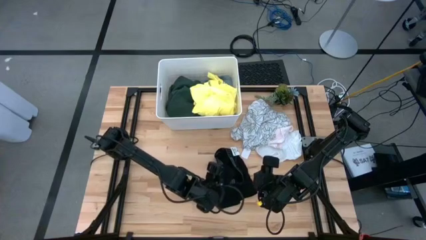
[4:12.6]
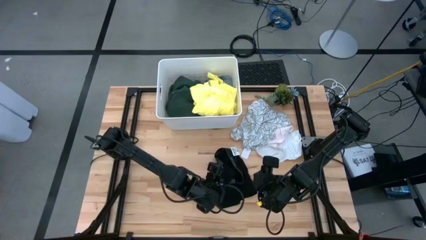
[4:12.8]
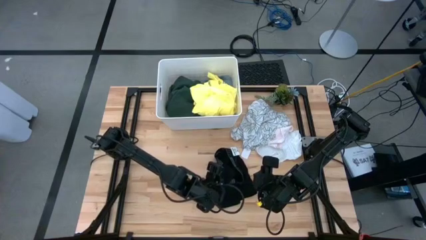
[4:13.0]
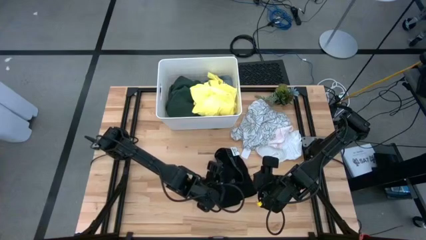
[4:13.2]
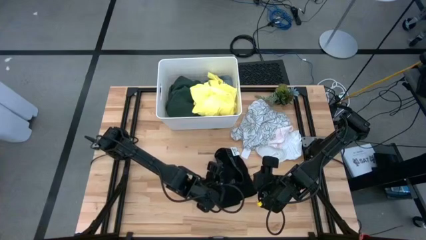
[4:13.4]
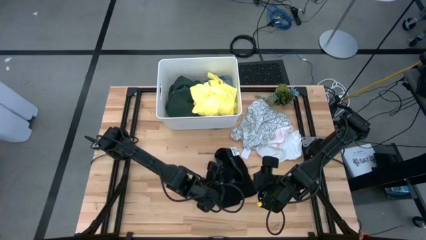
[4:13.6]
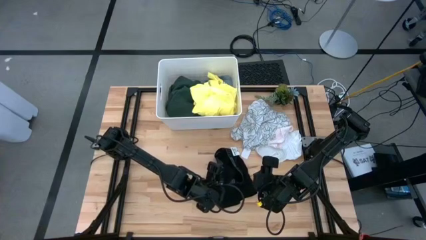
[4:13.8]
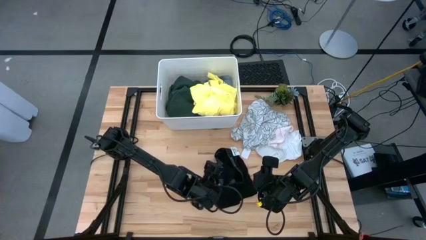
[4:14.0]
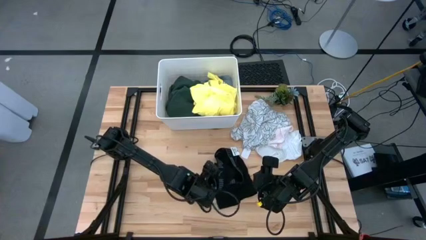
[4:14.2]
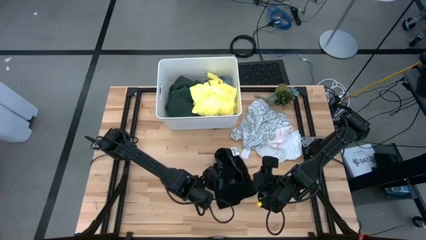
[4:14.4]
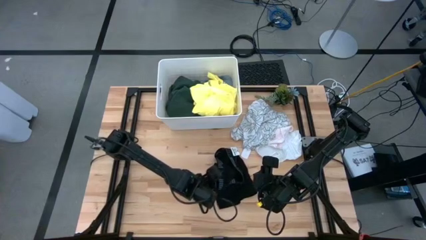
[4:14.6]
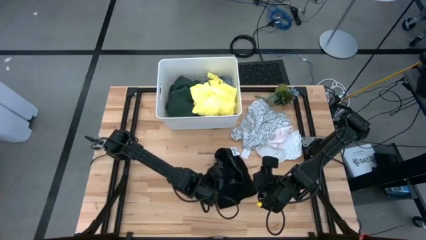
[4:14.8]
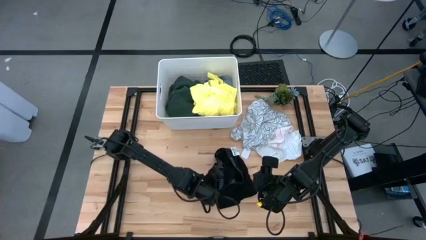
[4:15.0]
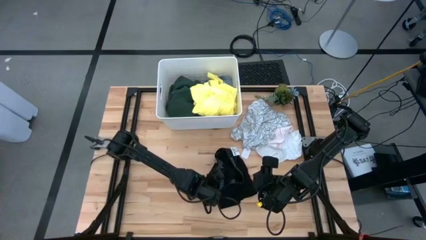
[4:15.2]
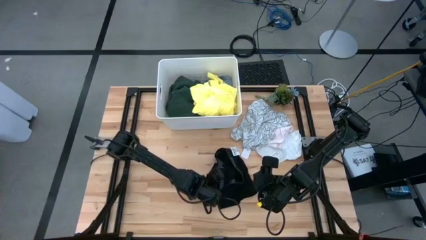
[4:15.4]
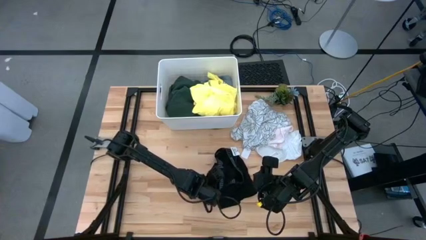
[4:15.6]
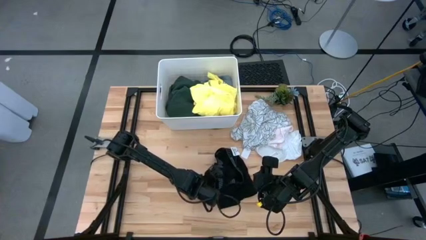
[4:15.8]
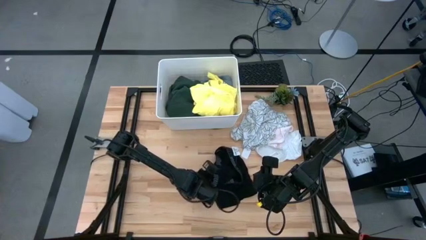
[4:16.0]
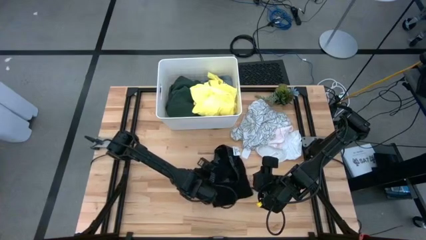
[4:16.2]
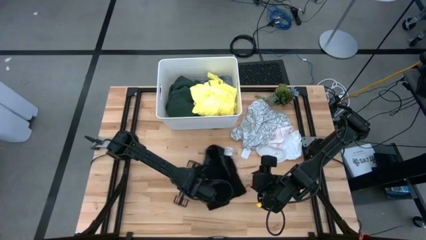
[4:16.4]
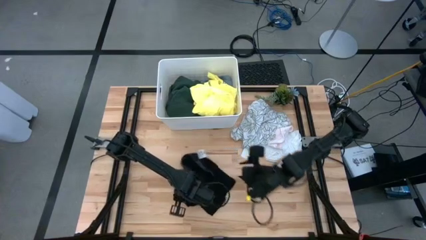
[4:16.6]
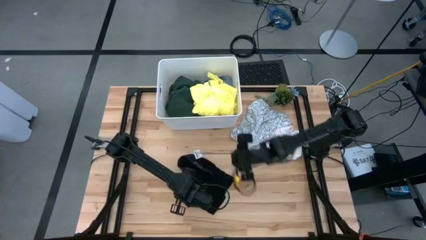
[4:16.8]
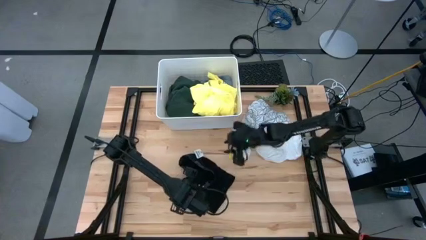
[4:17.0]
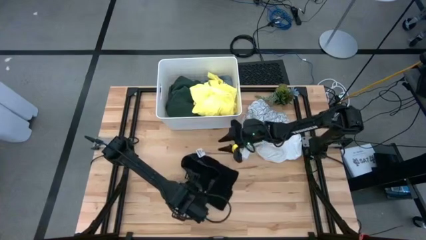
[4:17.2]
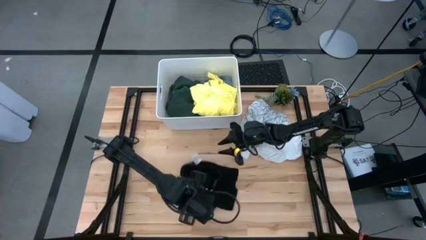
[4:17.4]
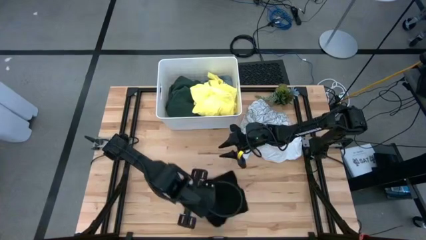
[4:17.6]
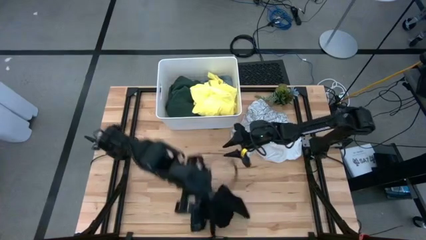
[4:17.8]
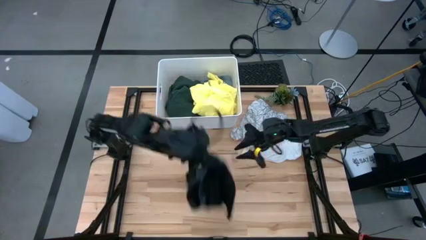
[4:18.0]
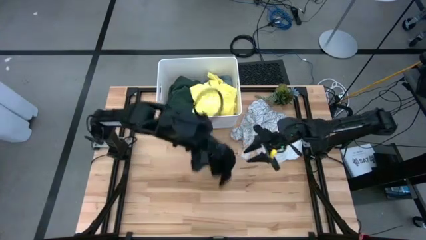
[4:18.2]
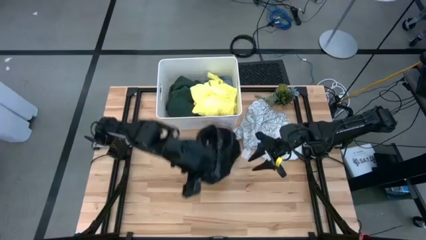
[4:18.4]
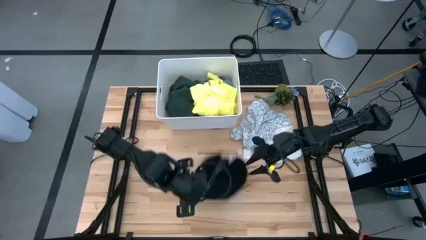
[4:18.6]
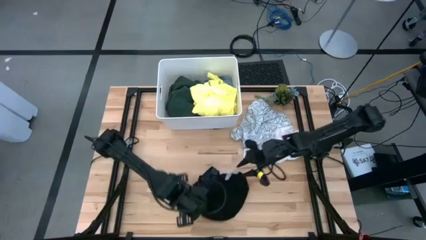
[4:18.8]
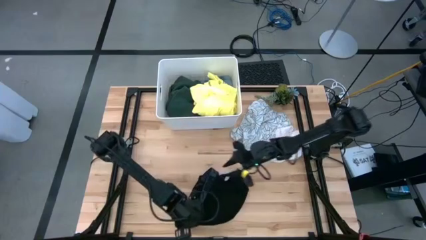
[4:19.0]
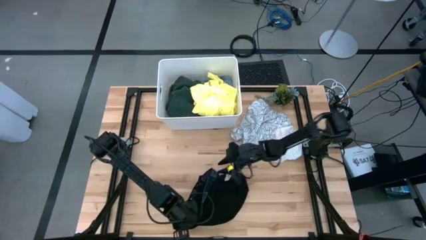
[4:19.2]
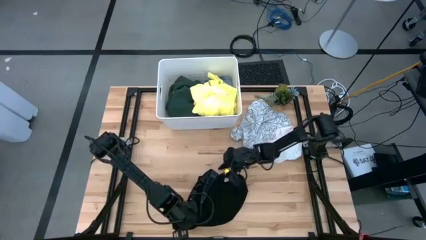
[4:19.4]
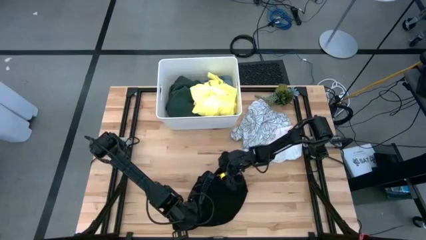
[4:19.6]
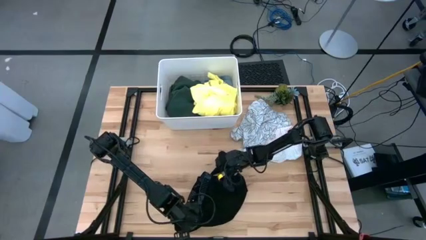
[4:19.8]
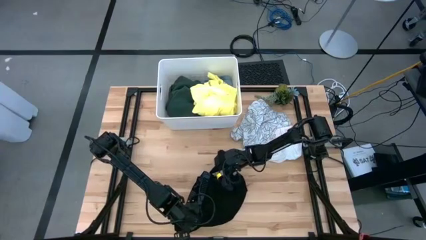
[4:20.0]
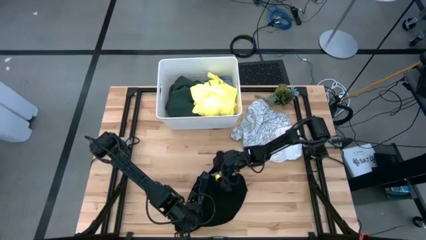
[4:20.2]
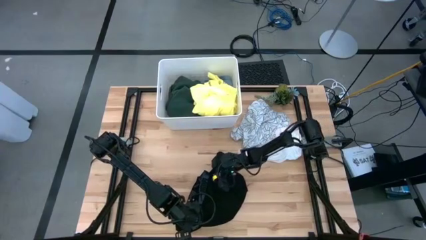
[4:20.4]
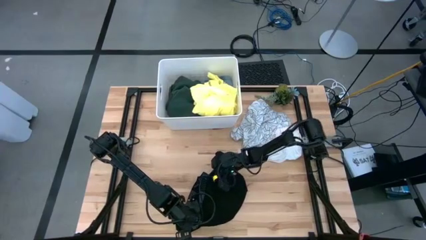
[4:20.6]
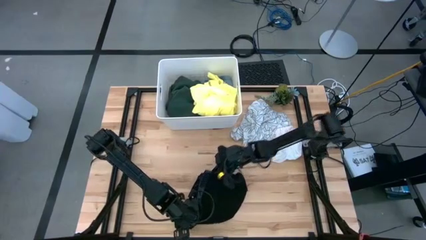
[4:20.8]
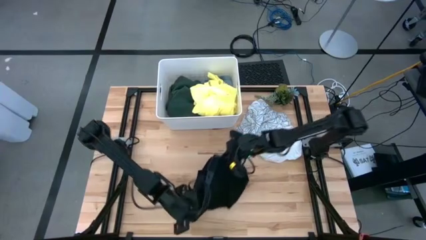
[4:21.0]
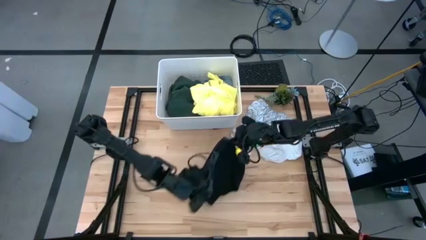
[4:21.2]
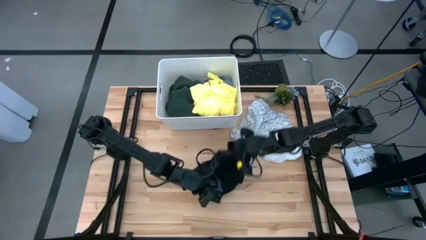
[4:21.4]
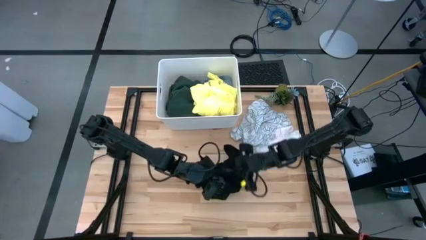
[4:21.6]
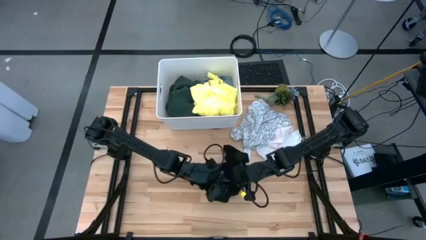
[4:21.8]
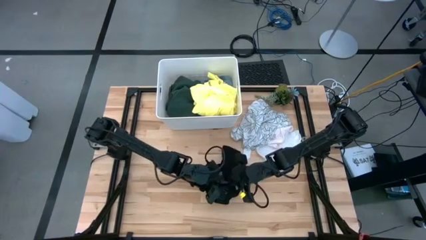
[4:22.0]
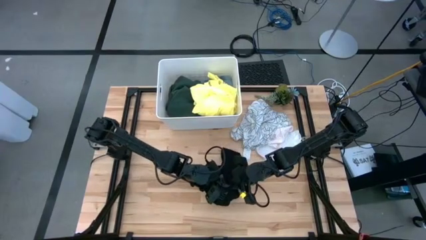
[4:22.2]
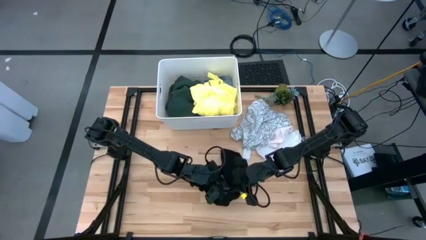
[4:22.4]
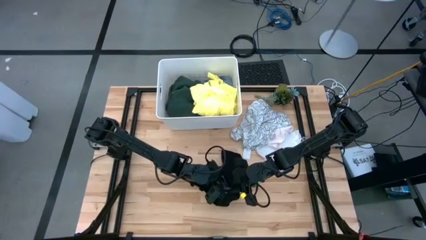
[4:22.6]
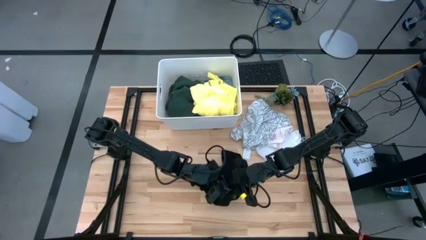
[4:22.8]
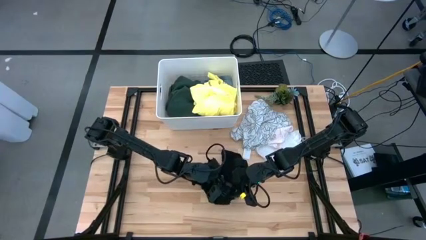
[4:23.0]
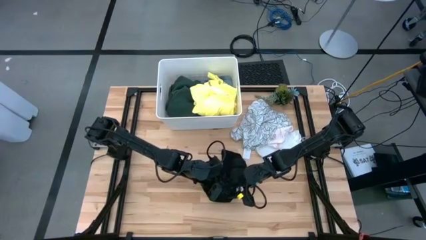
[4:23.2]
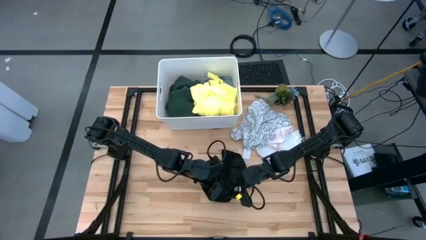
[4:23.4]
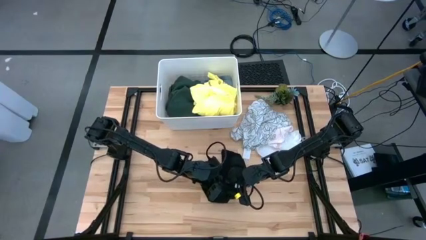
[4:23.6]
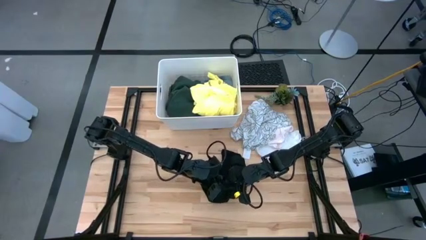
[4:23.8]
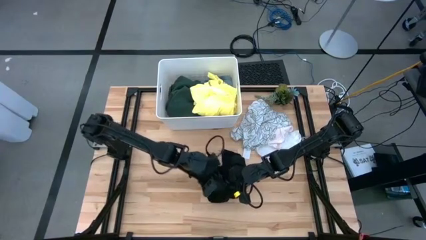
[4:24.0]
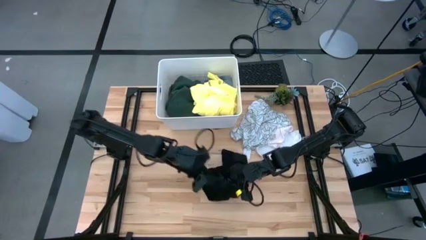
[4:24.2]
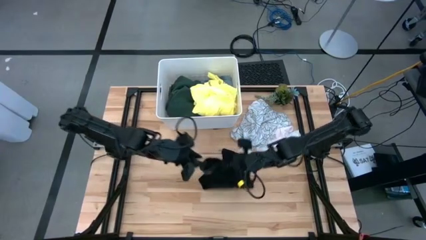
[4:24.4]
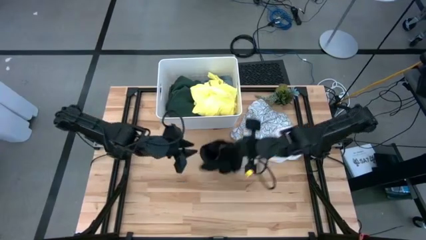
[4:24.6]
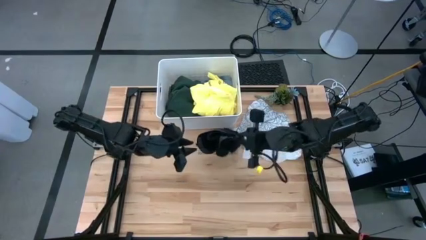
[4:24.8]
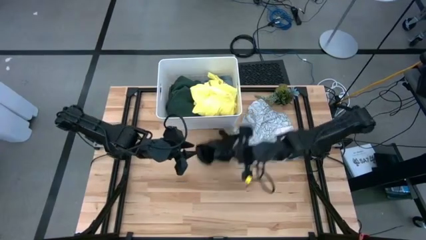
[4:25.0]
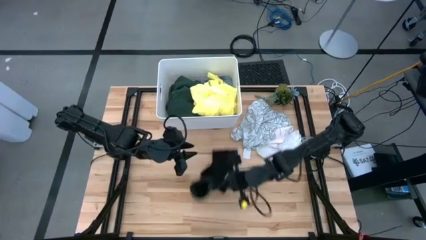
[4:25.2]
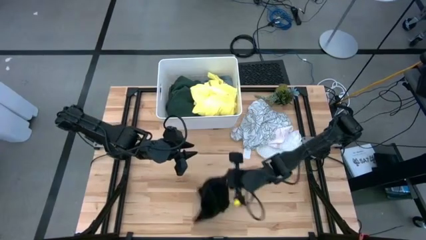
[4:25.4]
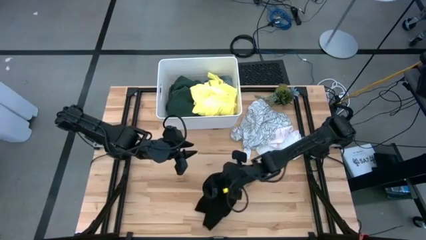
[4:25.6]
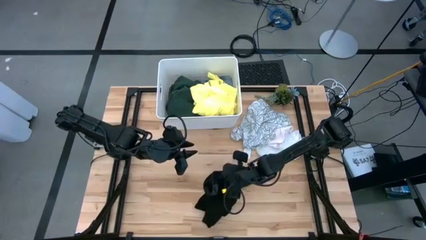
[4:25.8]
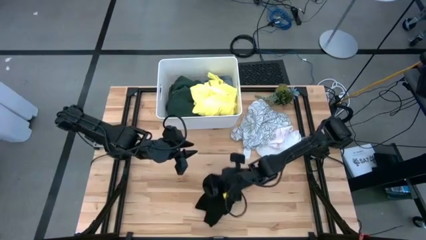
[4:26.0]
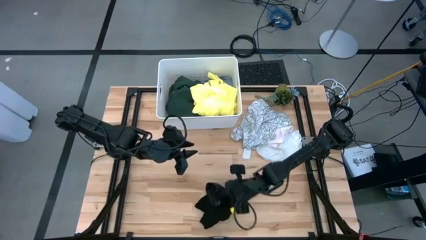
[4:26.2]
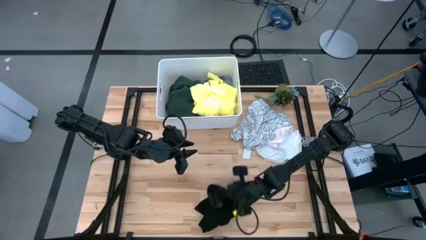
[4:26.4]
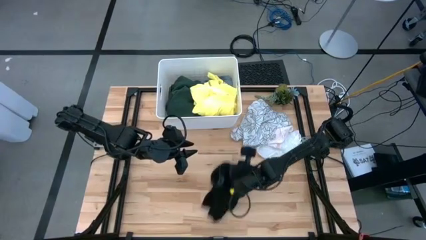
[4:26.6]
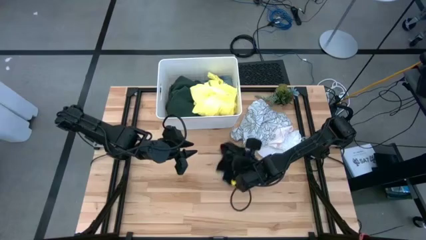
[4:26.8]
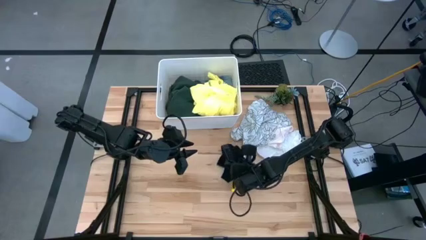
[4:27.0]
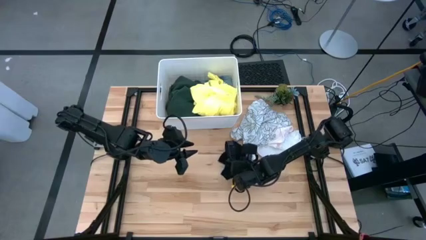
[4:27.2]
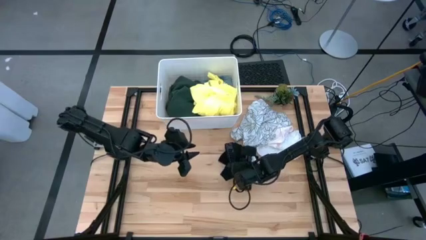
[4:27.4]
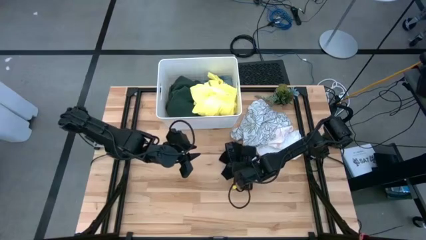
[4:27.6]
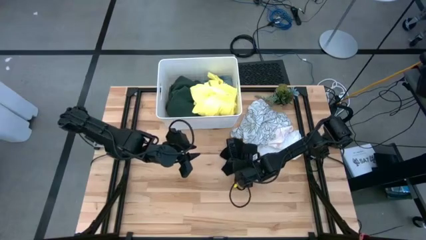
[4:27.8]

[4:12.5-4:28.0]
Task: Fold laundry
Fold the black underwear

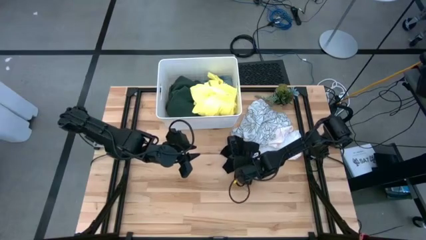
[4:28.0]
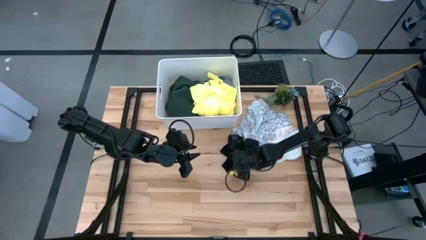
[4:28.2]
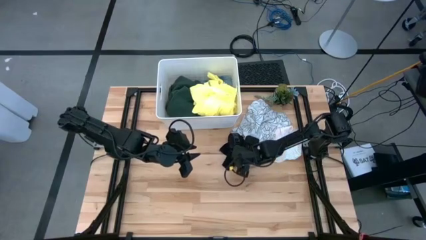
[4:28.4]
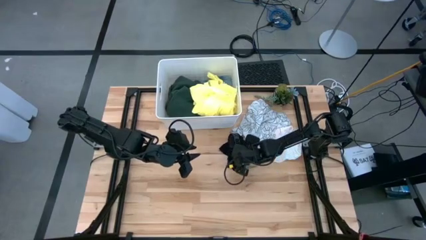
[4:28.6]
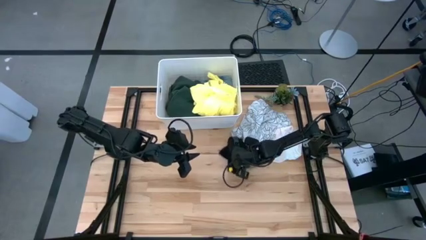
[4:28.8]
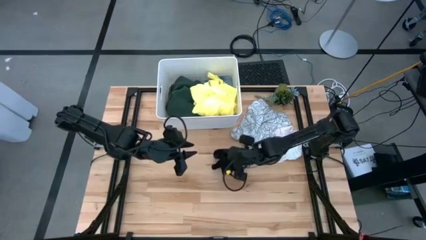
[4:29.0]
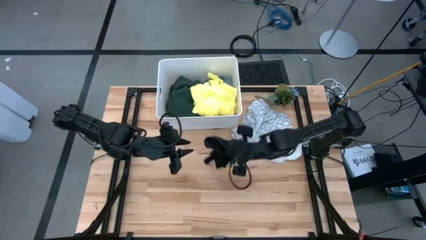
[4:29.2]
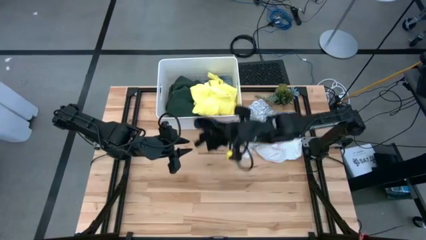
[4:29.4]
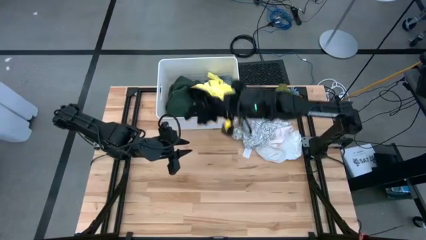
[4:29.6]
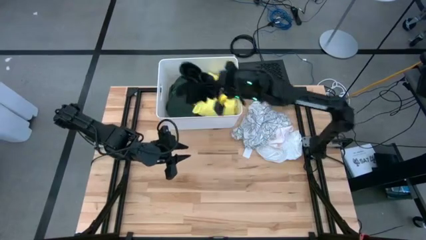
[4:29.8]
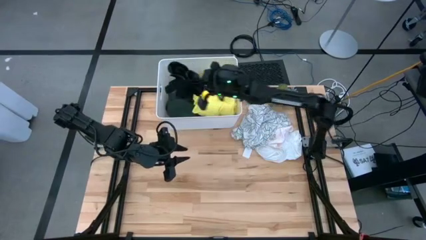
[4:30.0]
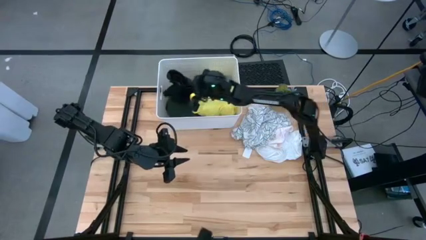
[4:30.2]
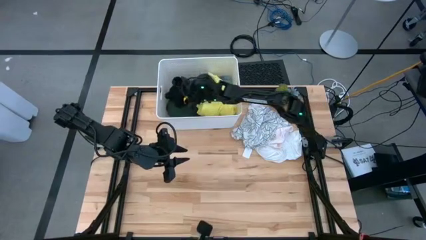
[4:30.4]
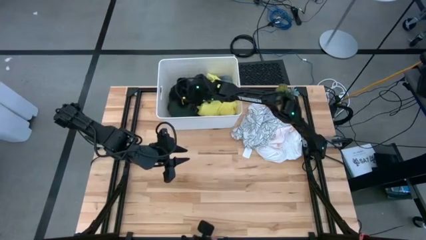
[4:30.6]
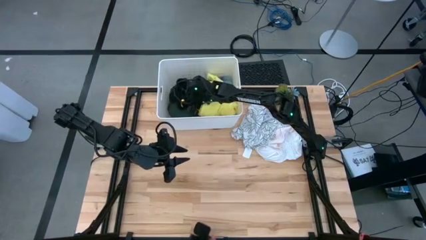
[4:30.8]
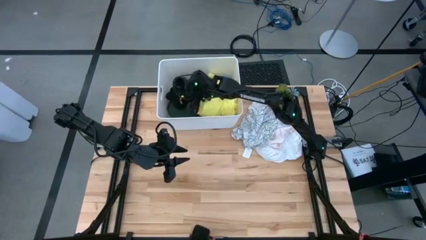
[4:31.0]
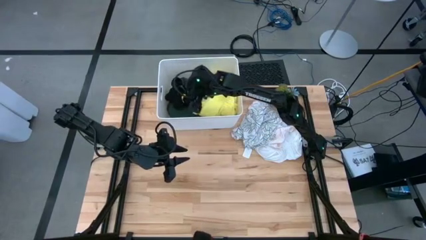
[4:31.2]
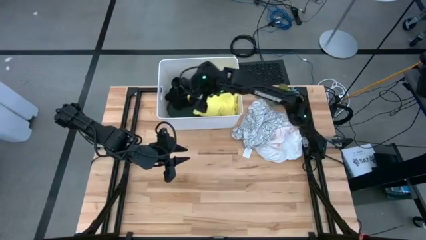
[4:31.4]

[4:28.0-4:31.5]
Put the folded black underwear into the white laundry bin
